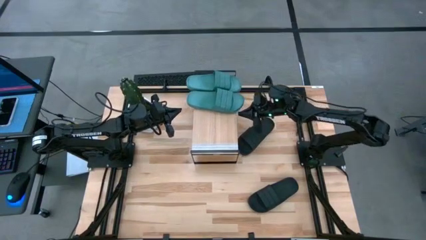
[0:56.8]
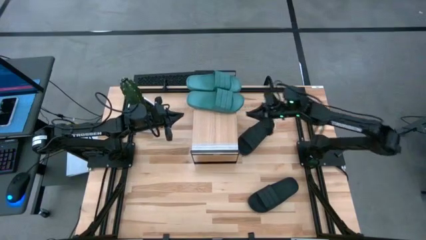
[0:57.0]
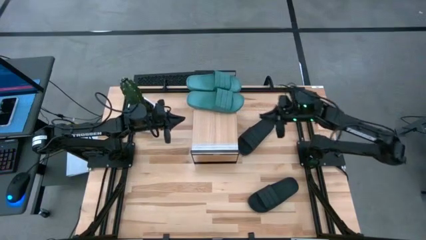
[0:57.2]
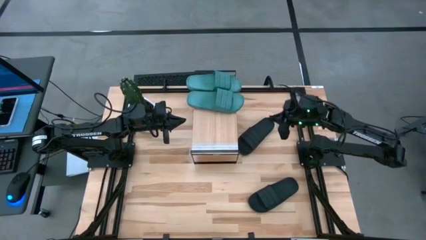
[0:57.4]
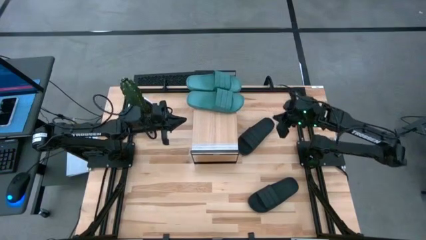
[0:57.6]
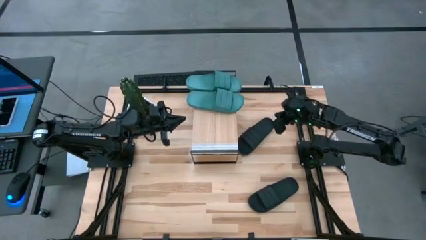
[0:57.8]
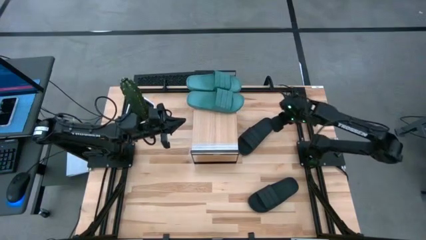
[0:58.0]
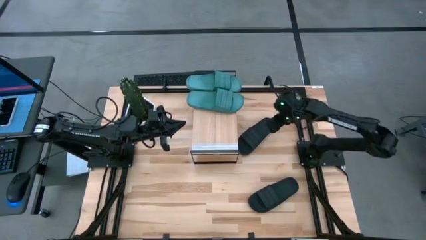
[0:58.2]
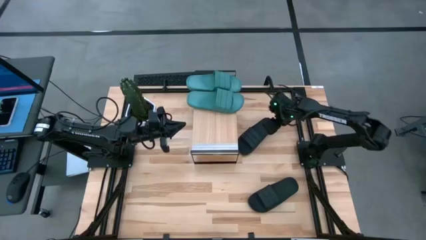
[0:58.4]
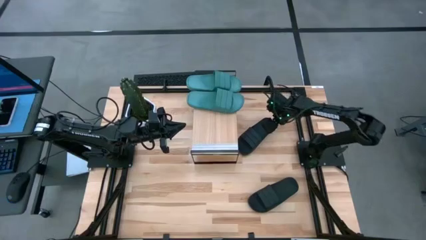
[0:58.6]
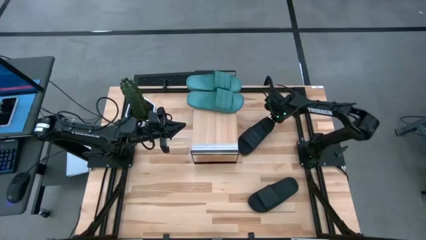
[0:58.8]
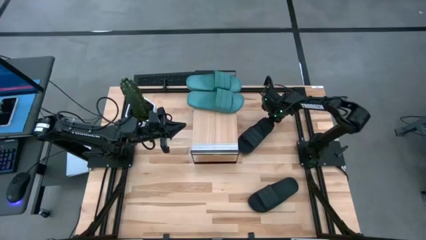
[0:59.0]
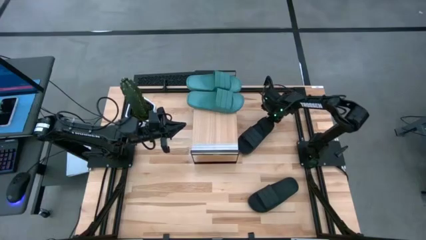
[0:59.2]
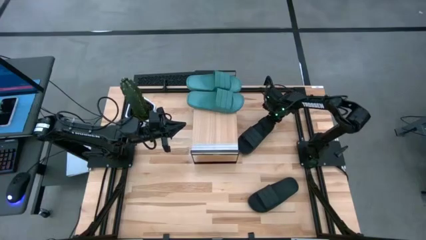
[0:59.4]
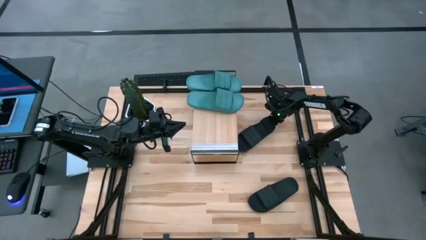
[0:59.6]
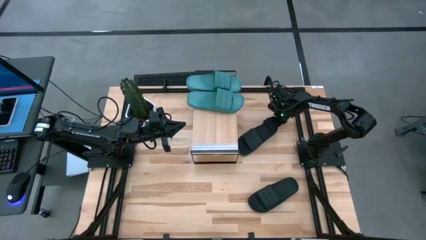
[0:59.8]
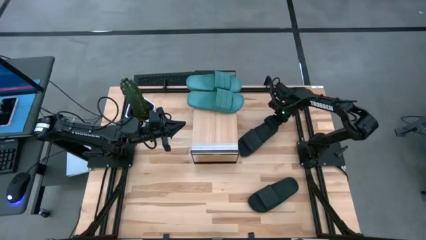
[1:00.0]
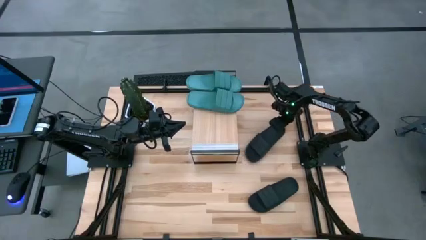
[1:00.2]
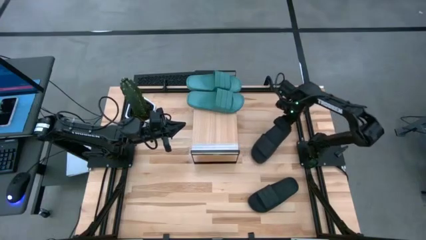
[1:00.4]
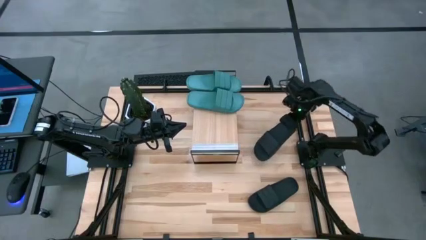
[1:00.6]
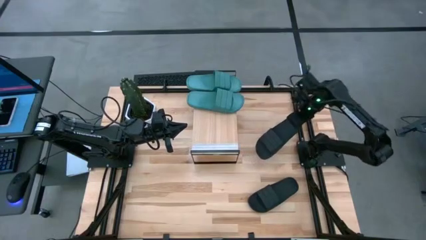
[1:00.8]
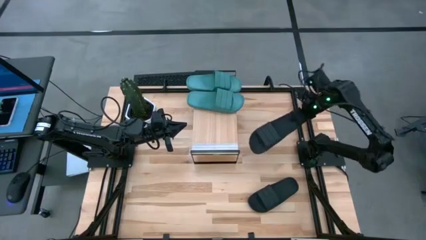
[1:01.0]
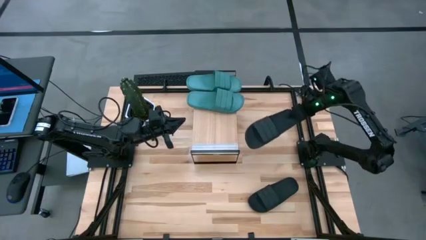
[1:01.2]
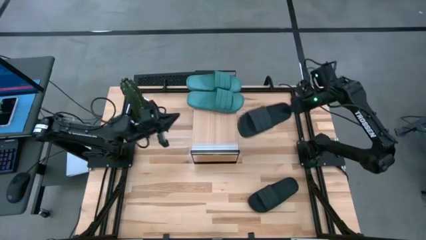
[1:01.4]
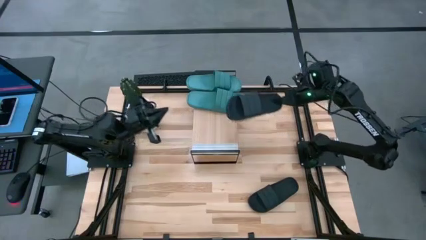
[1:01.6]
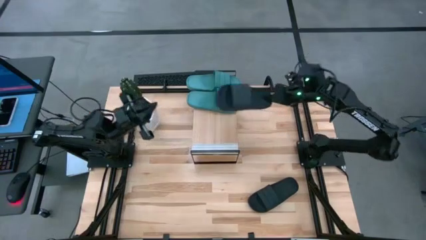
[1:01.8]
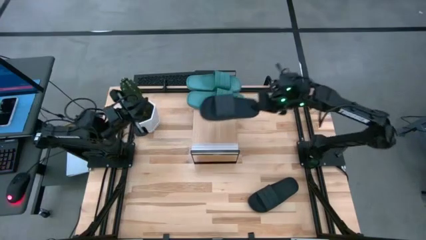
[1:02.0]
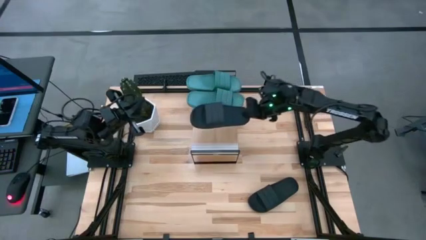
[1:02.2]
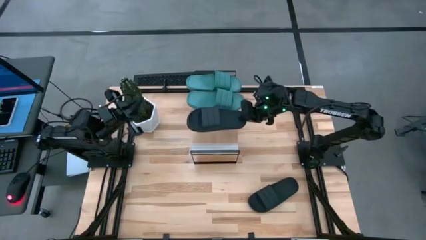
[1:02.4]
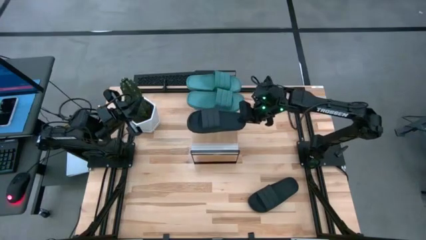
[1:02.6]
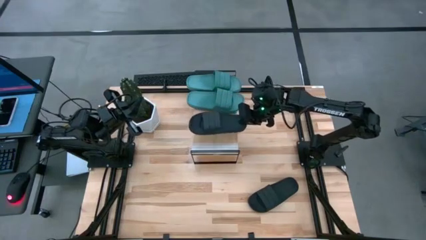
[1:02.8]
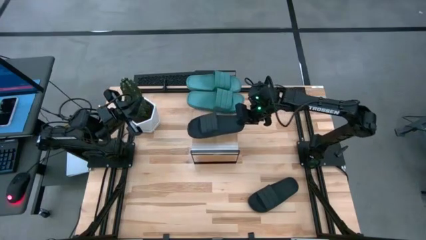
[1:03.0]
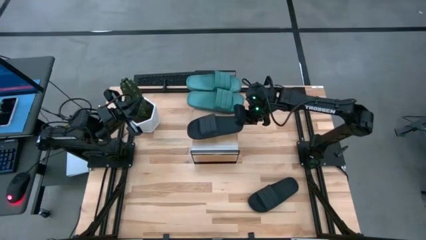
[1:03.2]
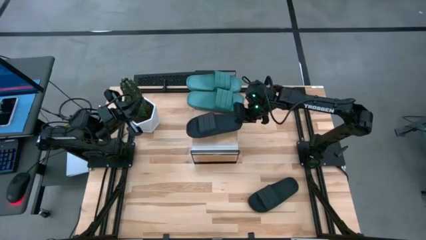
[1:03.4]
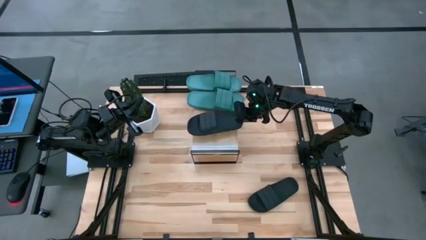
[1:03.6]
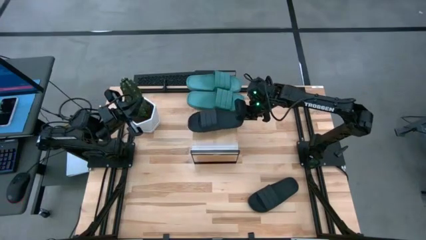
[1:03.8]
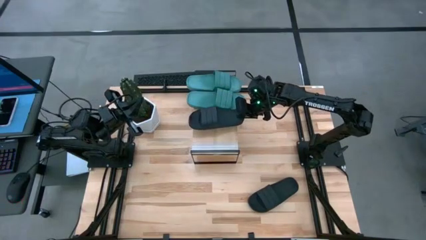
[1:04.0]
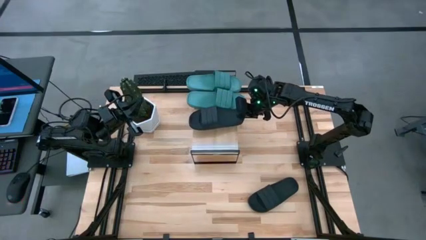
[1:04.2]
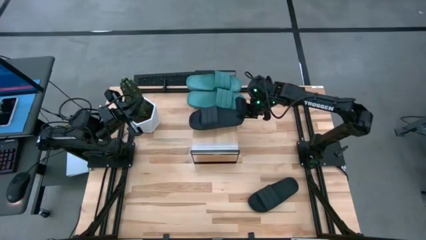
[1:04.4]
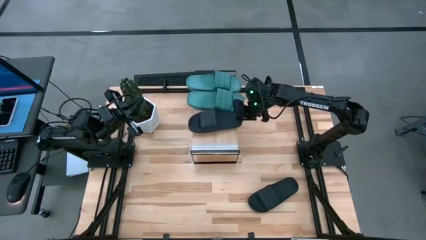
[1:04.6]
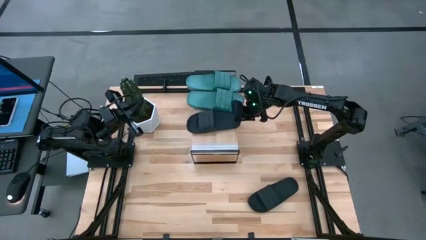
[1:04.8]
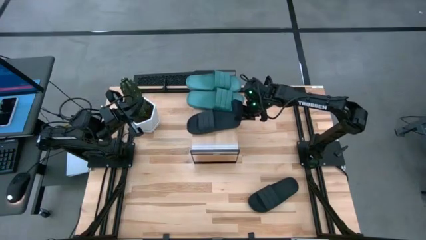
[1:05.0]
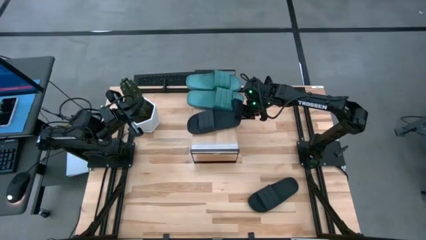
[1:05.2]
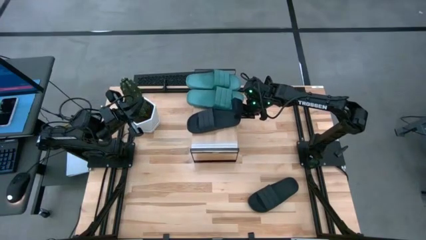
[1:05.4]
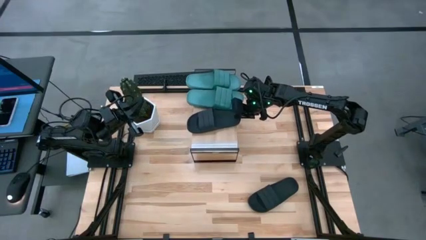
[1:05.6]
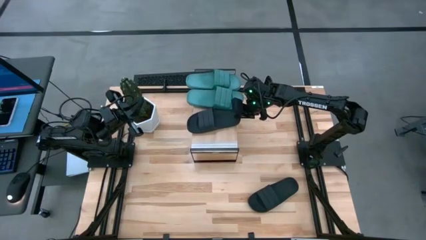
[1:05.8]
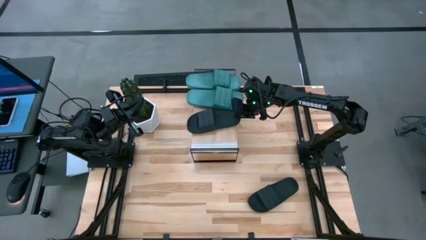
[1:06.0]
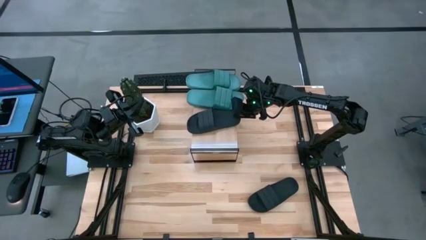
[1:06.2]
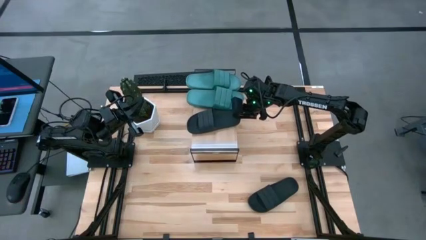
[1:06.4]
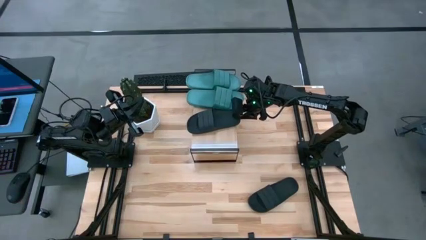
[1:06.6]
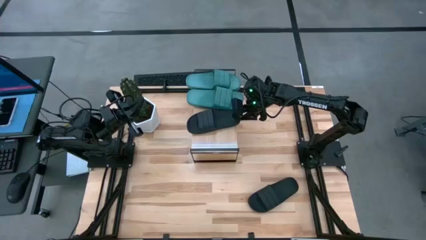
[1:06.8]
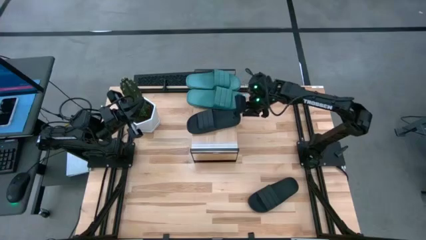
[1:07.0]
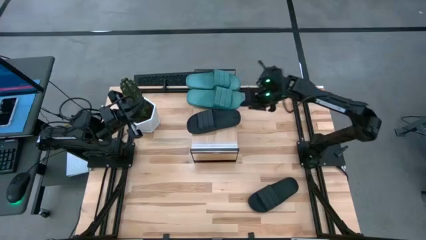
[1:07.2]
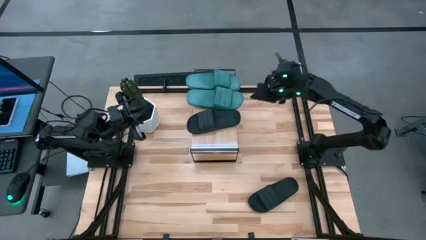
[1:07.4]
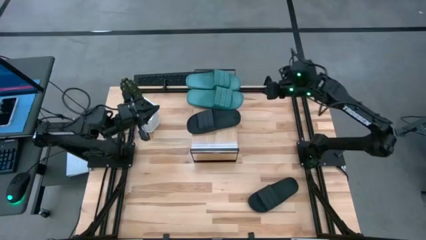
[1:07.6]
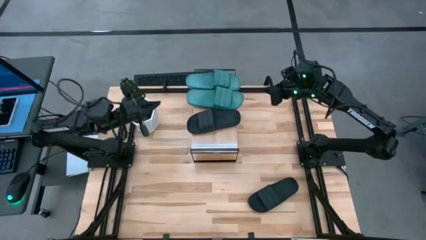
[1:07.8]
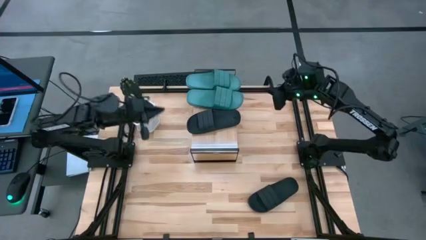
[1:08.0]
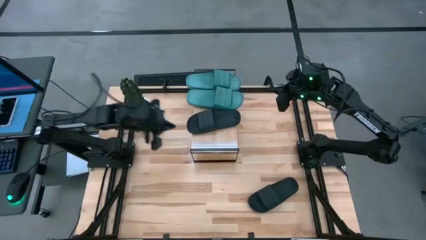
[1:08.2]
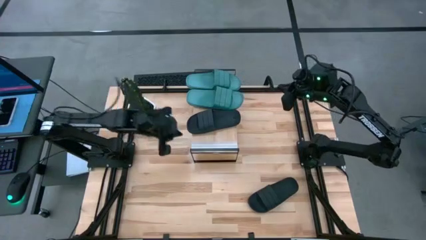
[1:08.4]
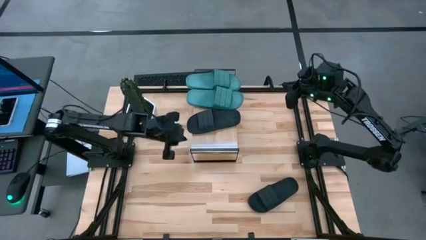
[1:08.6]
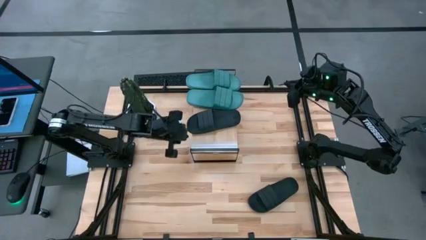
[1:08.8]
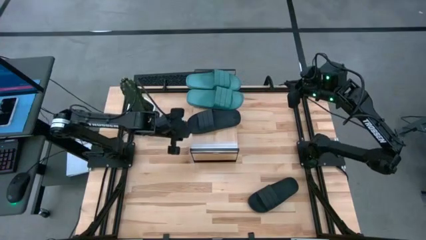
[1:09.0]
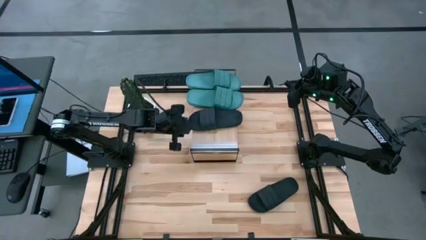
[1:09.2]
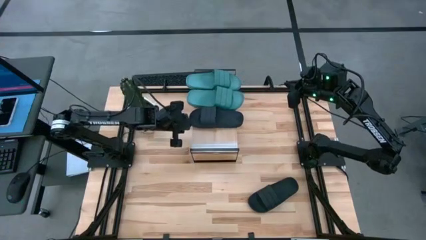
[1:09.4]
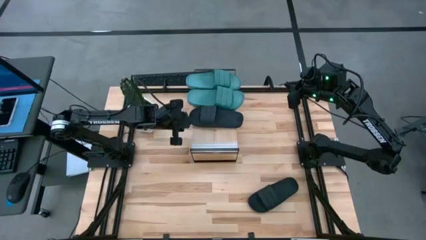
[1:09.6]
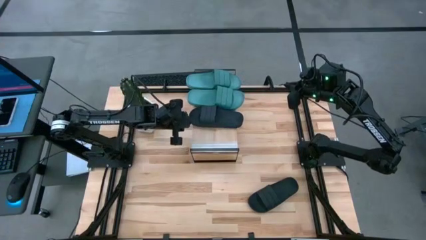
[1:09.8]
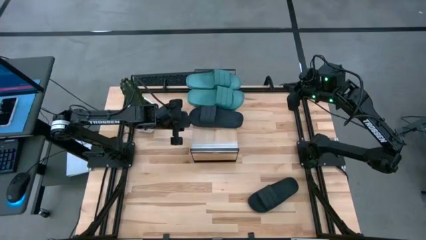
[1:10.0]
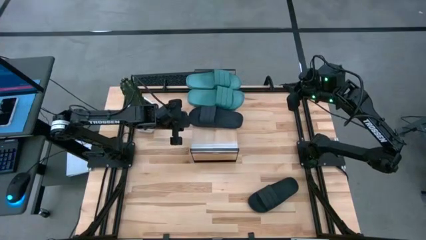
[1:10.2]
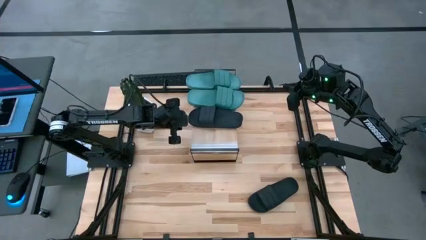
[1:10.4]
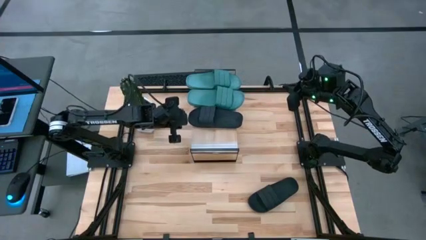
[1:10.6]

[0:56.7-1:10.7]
Task: Pick and place slides into the shelf
Put the top black slide on the shelf

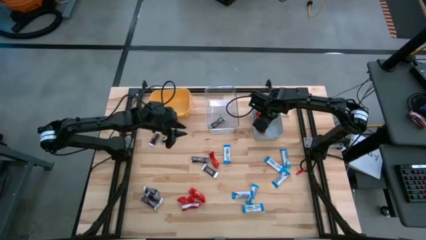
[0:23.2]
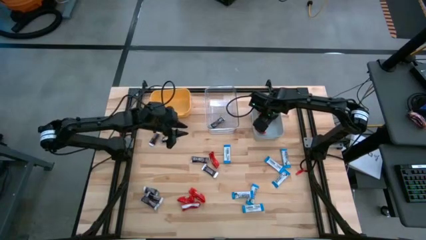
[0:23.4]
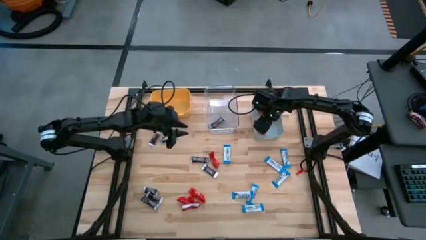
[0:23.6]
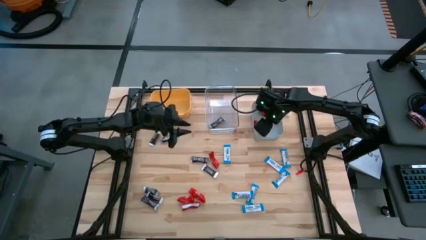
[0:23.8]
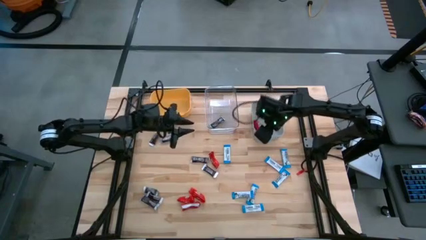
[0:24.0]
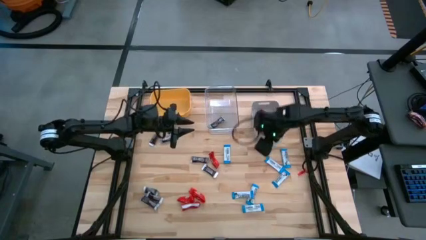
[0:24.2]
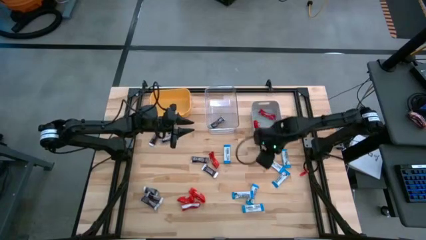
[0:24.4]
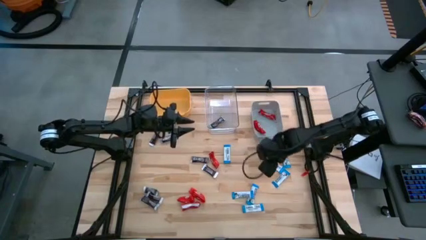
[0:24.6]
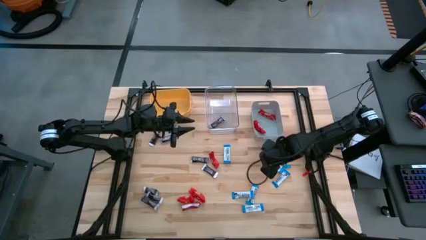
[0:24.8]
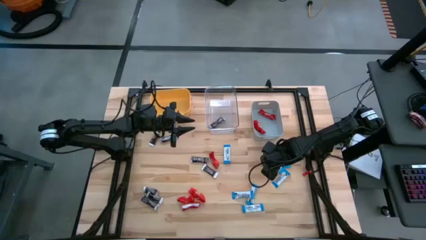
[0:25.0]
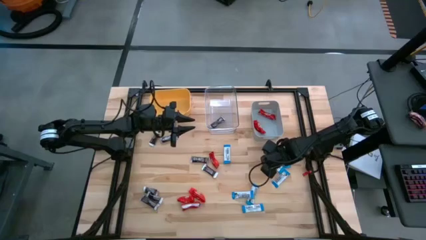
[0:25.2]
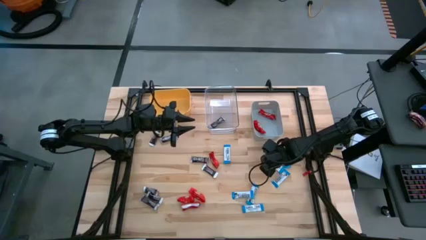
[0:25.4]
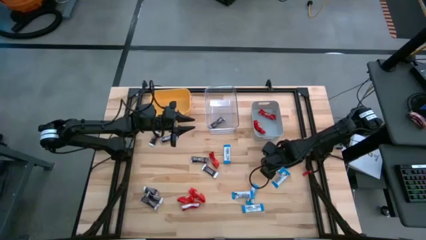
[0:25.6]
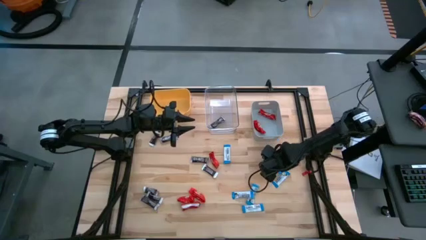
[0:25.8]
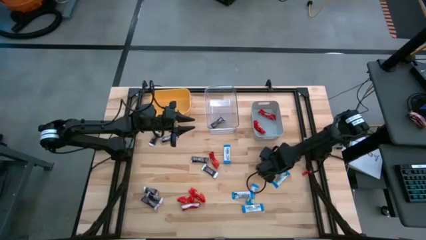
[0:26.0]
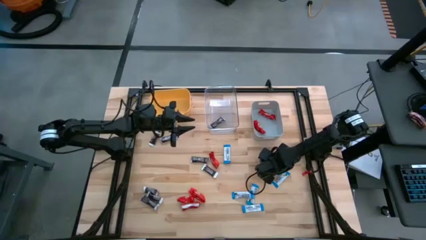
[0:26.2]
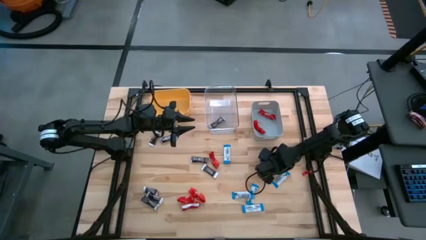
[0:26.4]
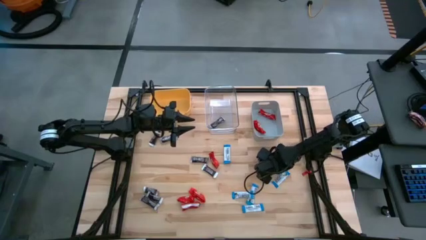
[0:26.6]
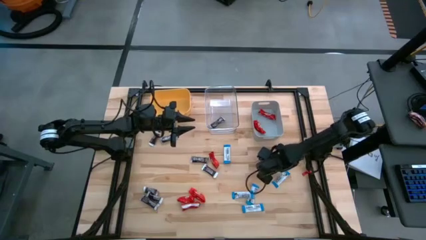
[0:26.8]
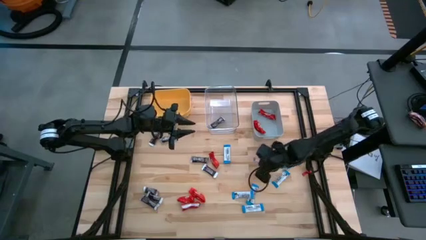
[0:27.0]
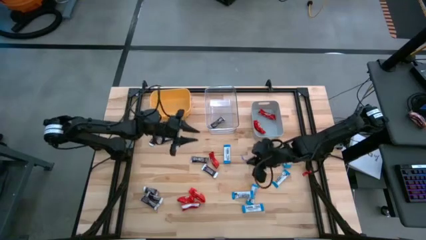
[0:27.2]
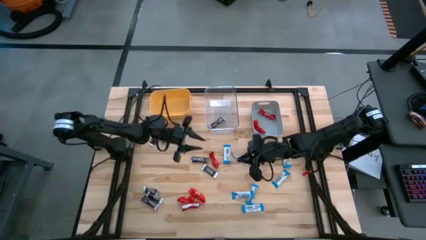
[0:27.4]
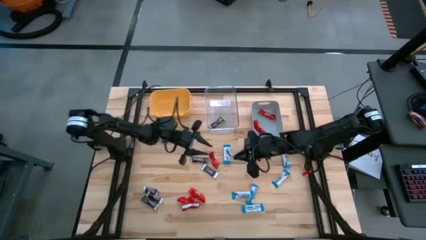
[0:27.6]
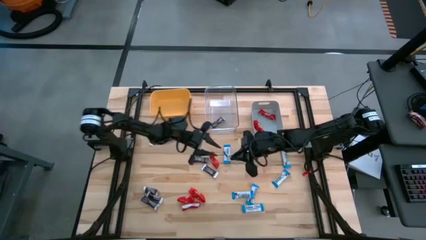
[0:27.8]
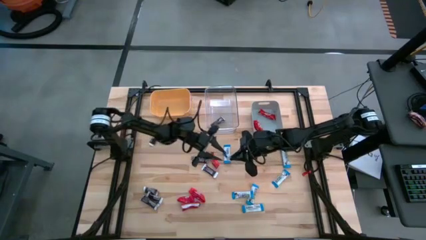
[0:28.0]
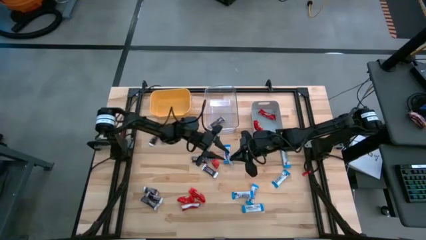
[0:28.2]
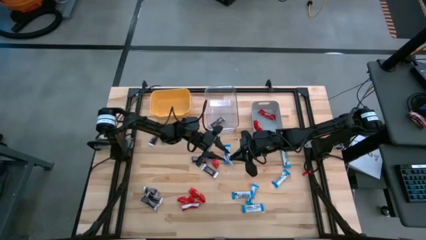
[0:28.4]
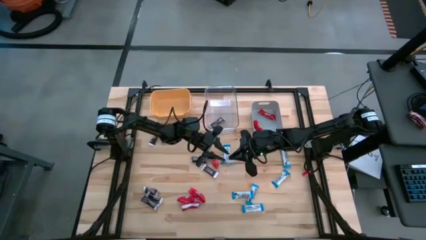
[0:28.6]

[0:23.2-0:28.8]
Task: Sort candy
Put the white chocolate into the yellow bin
